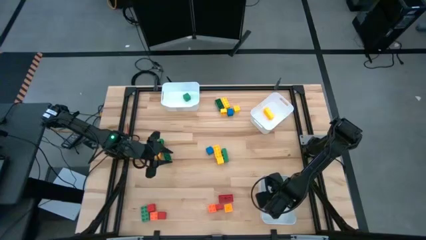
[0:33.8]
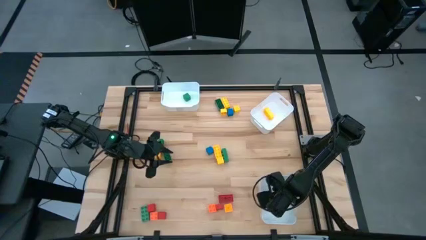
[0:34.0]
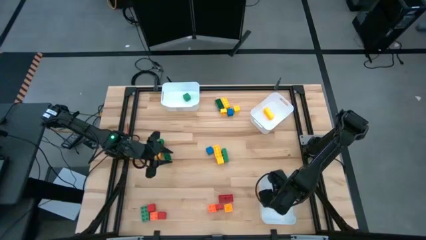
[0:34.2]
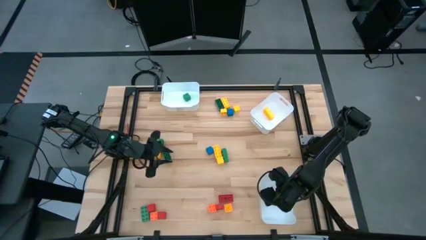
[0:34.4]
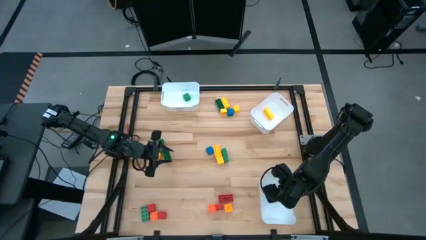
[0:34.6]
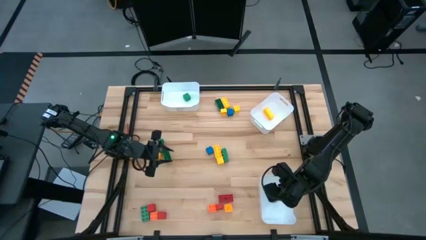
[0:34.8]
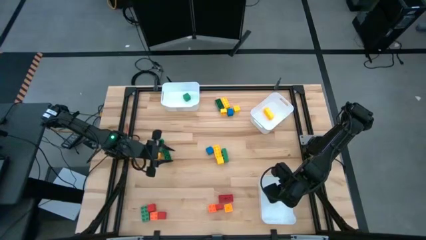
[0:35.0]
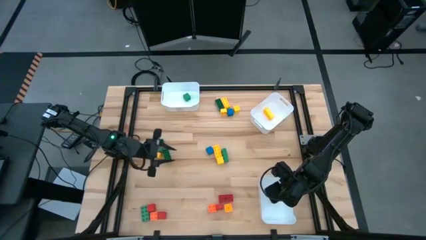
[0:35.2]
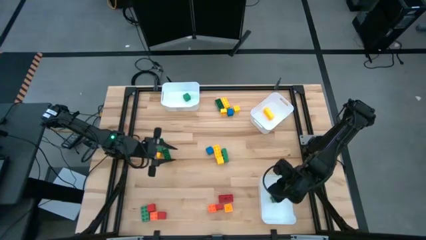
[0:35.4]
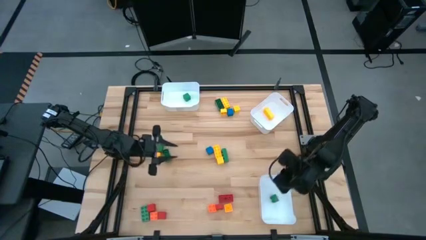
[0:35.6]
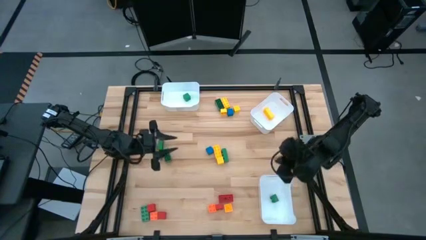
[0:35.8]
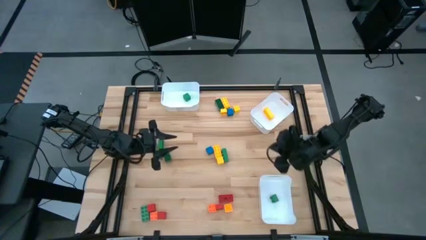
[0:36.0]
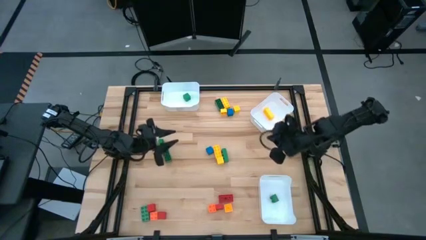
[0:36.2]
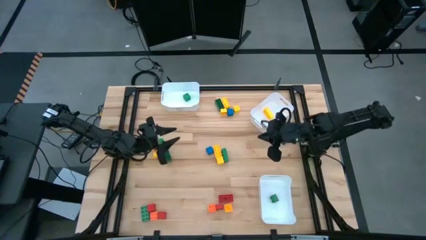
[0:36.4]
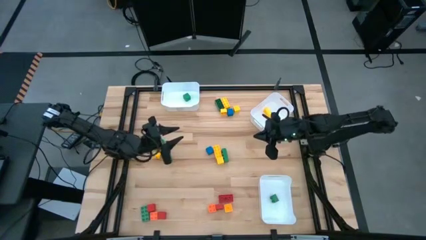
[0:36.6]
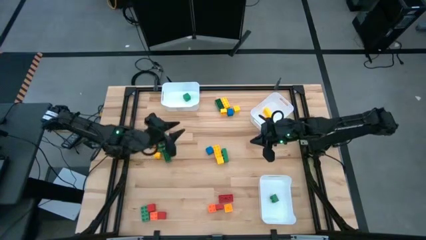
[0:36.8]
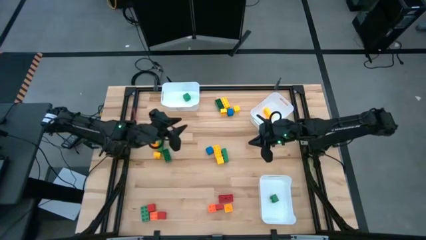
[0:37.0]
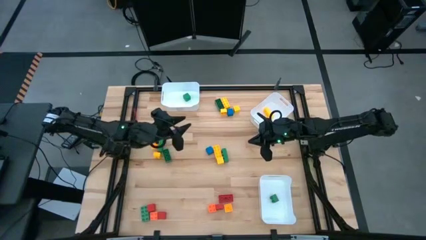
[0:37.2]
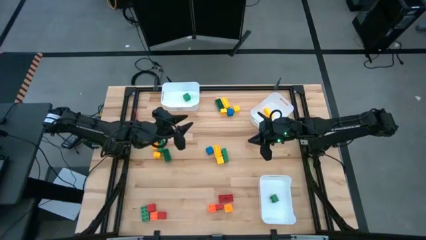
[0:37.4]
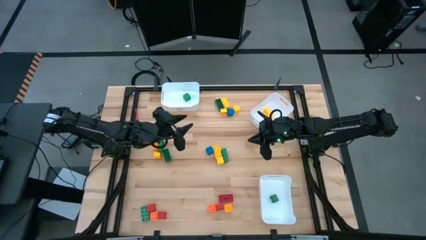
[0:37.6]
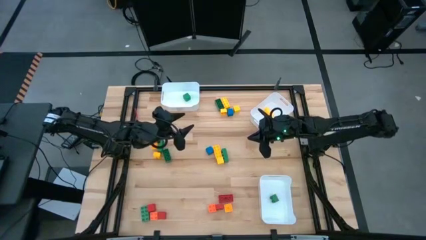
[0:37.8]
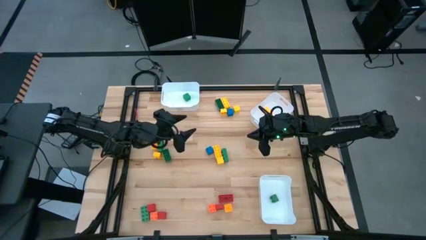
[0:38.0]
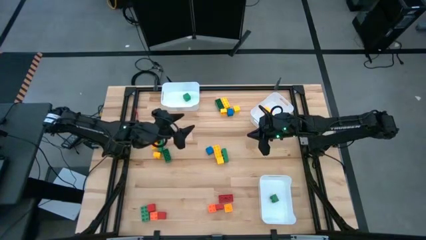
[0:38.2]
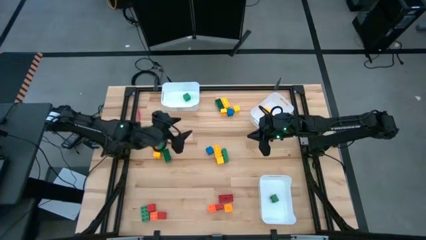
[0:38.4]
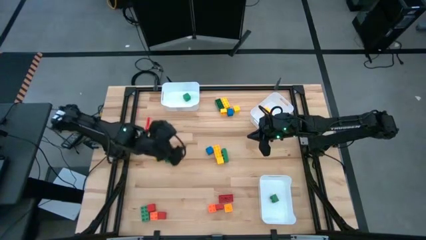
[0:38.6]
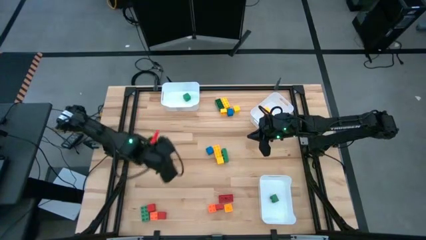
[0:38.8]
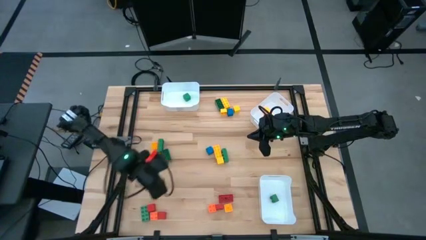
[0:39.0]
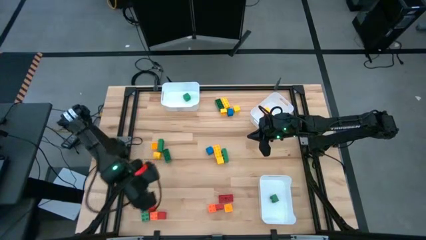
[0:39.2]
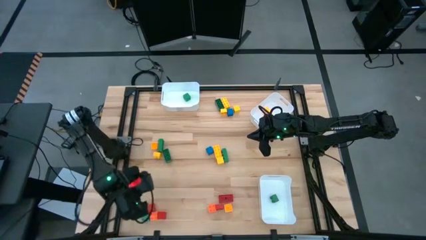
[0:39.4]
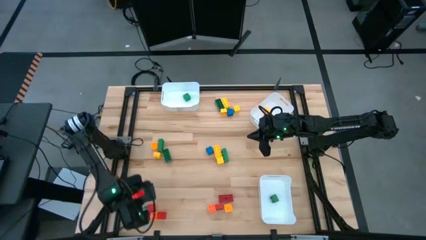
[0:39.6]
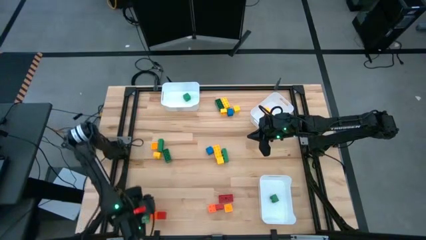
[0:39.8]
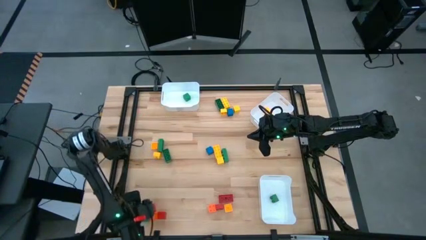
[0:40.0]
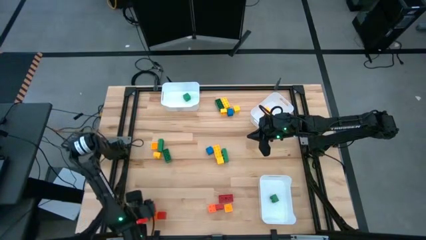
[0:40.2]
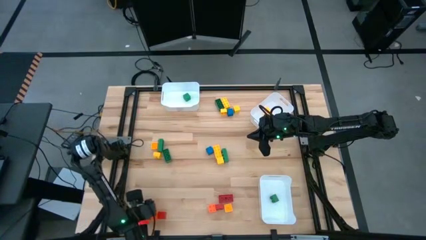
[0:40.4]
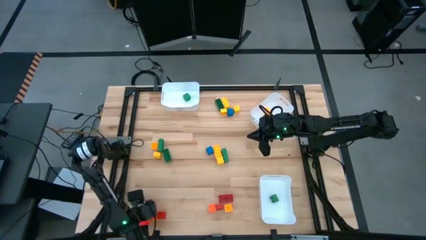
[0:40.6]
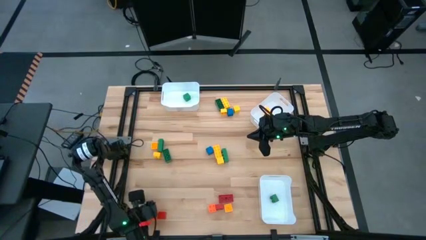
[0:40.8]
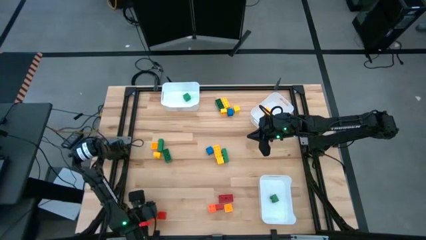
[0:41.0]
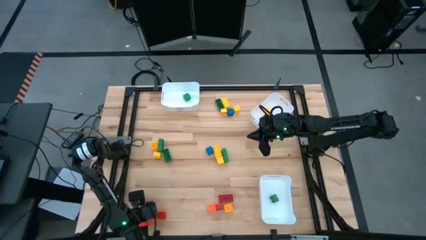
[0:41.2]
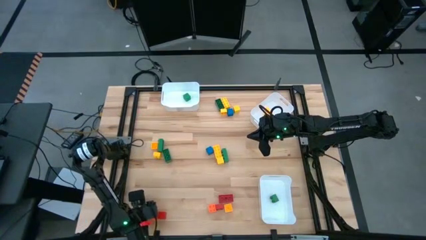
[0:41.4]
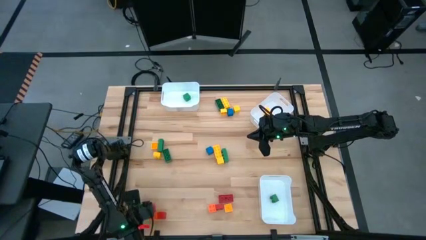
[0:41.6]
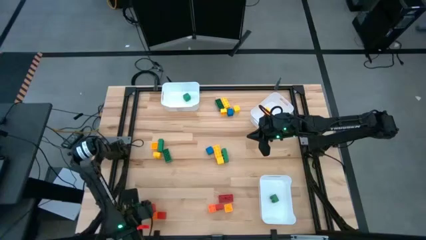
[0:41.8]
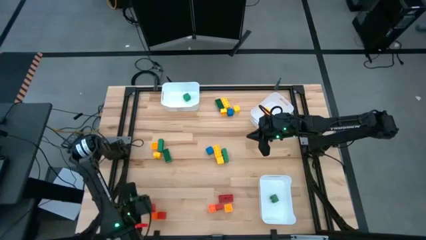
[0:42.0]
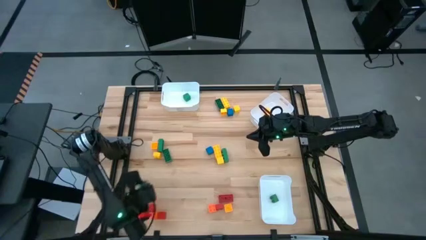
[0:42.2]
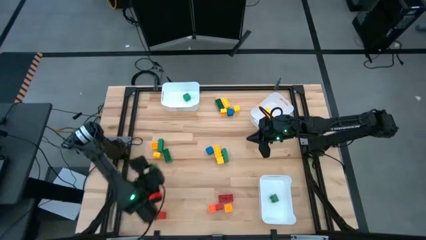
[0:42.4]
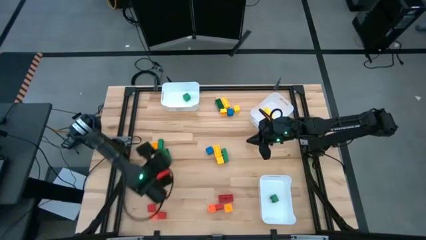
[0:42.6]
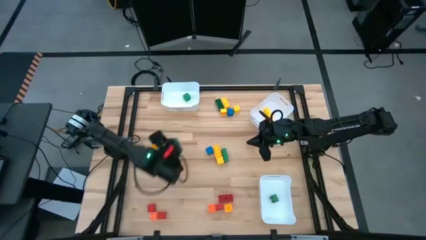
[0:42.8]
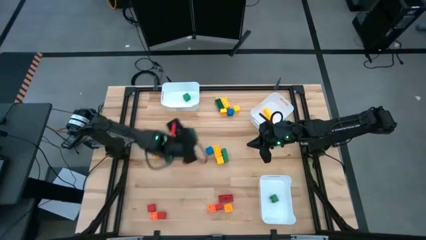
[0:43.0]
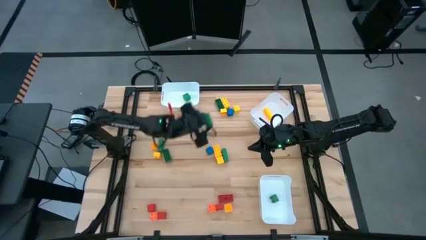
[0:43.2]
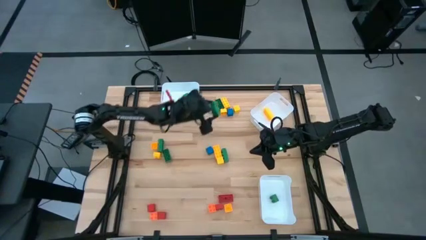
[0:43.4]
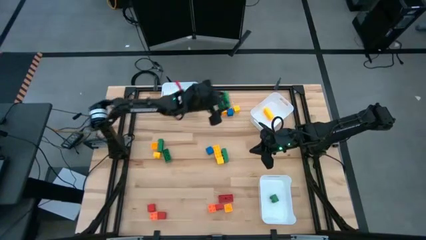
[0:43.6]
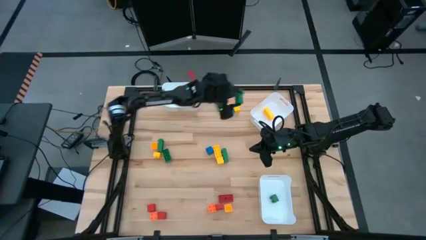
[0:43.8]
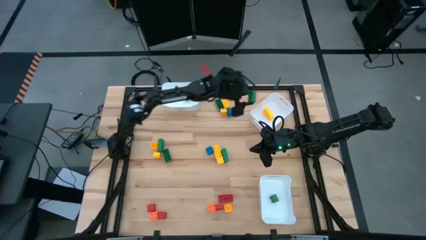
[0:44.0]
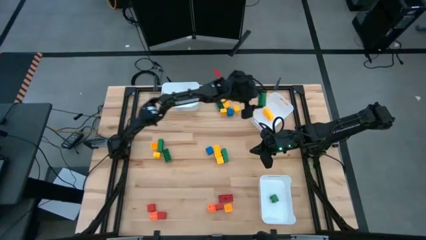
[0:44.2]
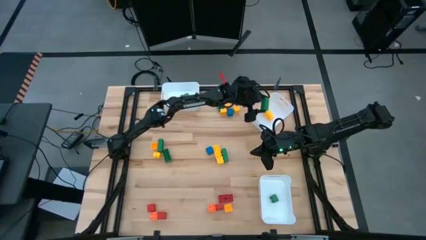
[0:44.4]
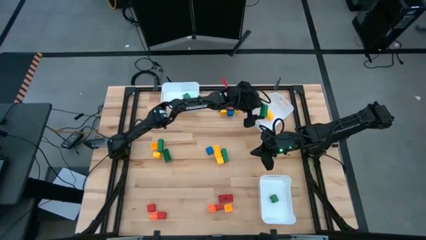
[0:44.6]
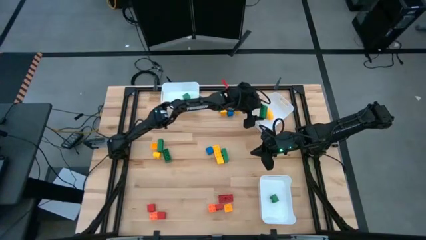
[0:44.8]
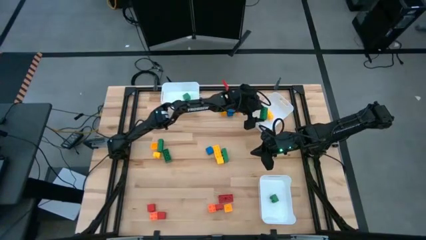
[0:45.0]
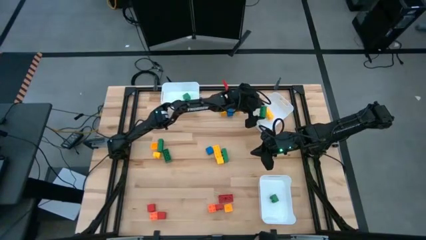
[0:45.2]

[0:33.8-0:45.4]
Task: Sort blocks by size
Put the green 8 stud gamepiece into the top right white bin

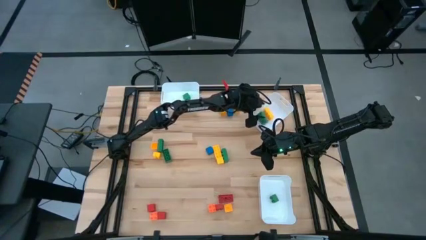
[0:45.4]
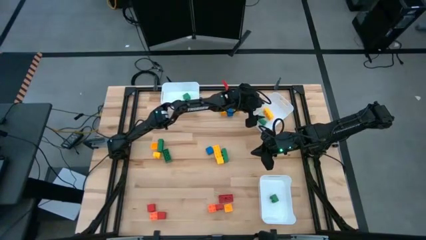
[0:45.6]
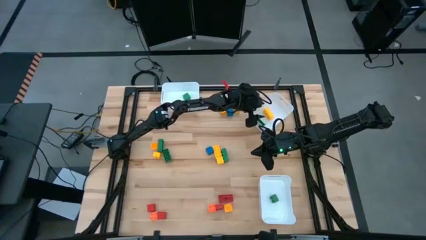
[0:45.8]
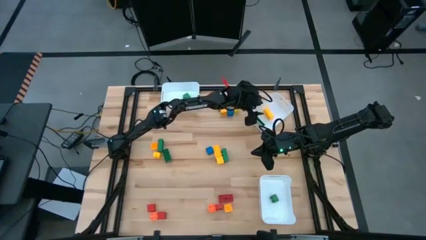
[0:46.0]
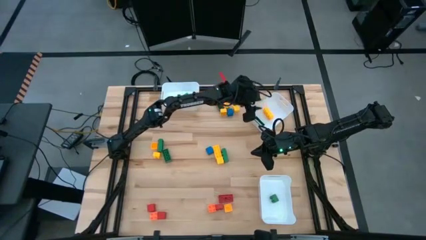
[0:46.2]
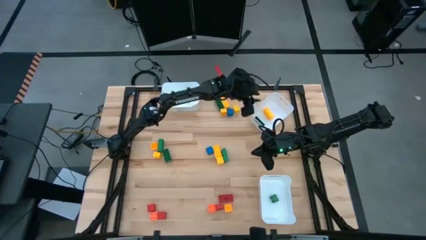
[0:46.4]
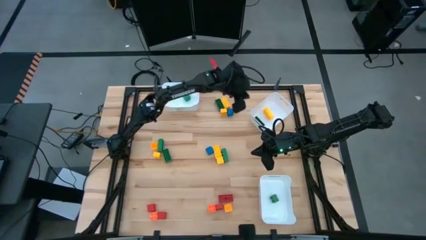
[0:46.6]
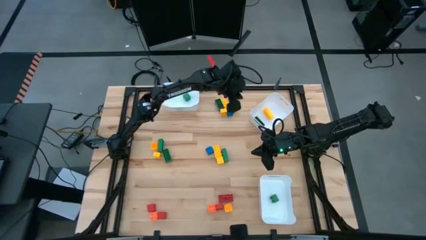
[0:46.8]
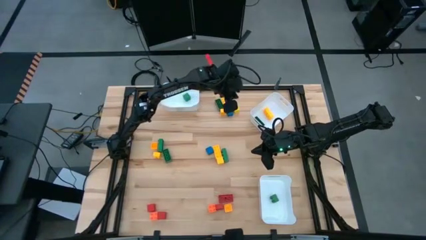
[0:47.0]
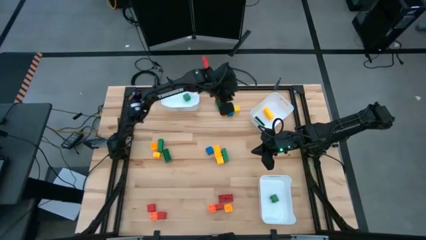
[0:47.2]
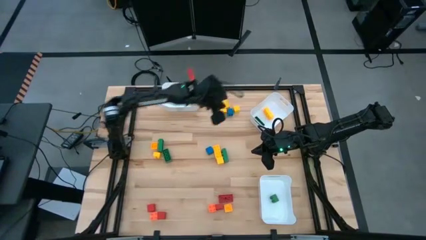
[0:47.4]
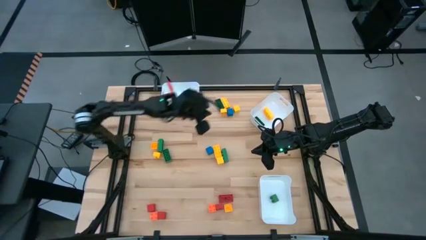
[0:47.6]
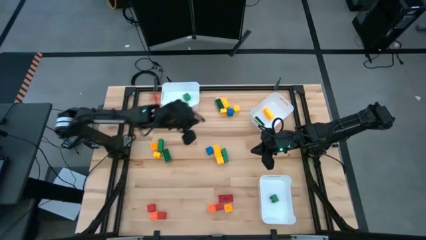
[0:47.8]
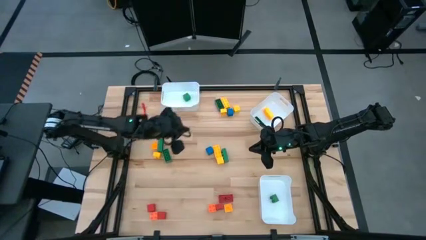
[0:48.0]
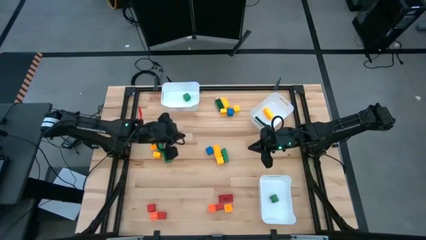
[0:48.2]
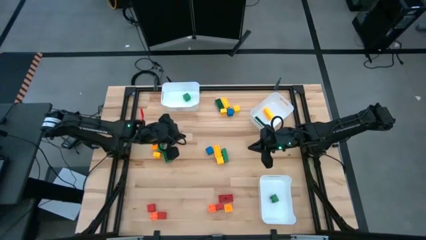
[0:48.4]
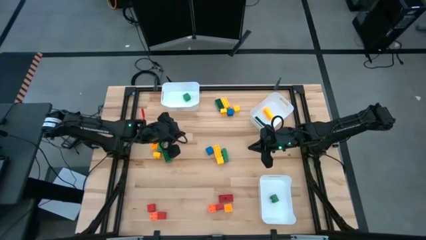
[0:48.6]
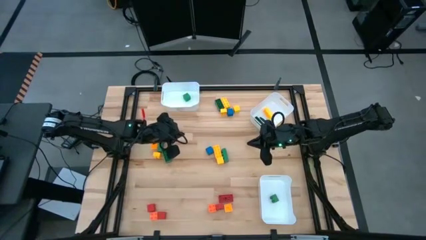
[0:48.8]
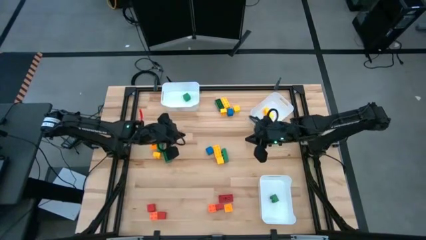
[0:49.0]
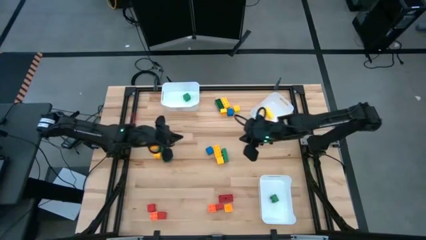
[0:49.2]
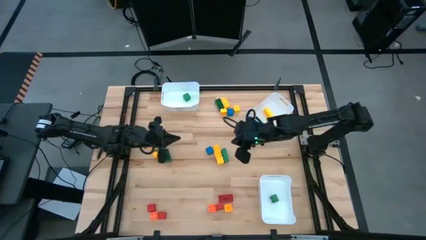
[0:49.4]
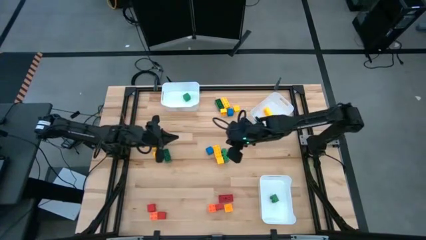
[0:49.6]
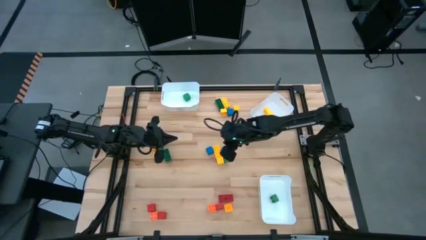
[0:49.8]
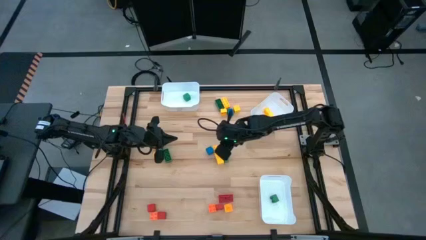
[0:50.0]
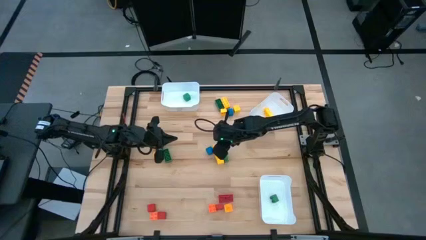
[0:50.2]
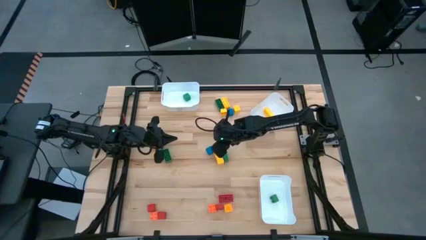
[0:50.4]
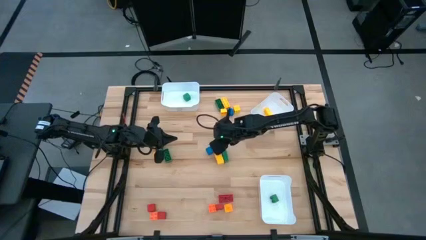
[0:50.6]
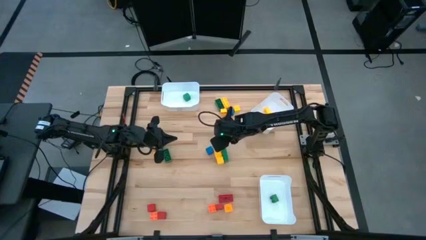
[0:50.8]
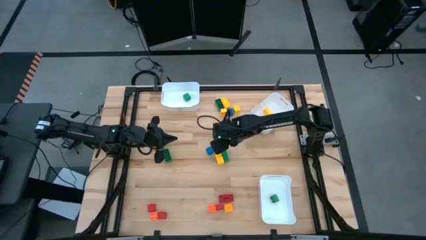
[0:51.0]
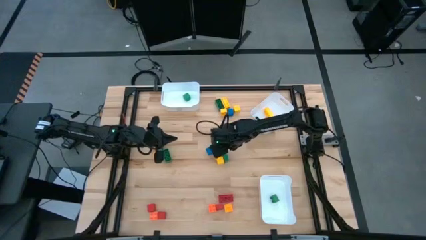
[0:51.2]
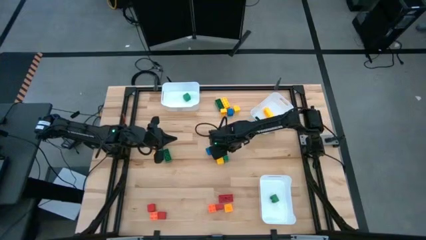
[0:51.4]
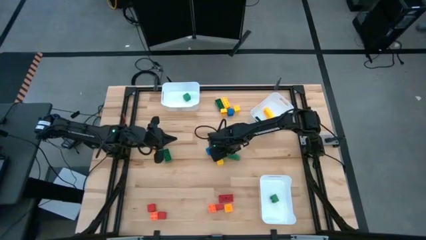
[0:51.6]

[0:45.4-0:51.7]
Put the green 8 stud gamepiece into the top right white bin
